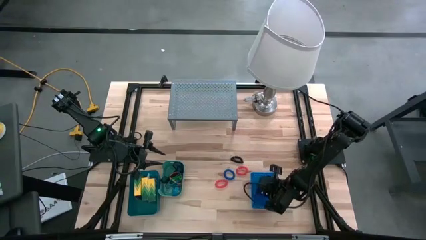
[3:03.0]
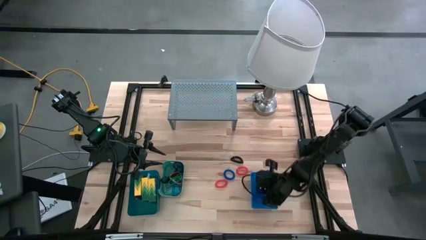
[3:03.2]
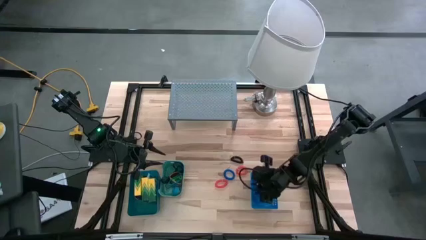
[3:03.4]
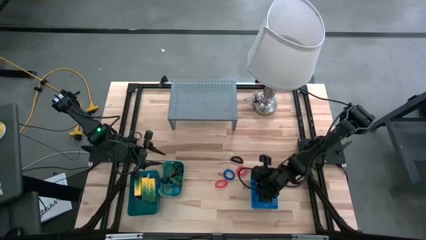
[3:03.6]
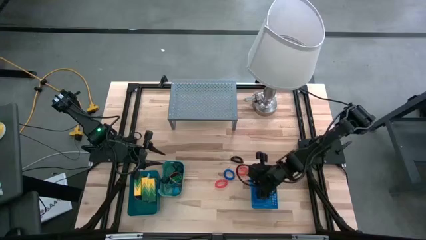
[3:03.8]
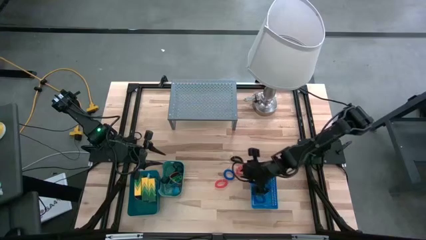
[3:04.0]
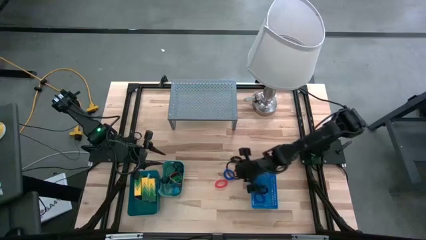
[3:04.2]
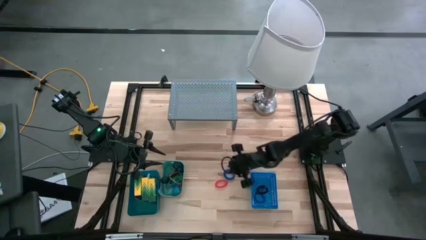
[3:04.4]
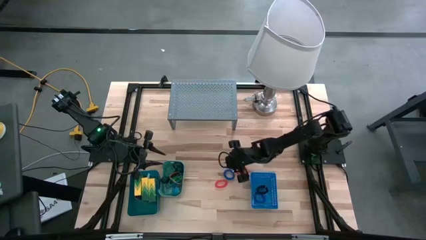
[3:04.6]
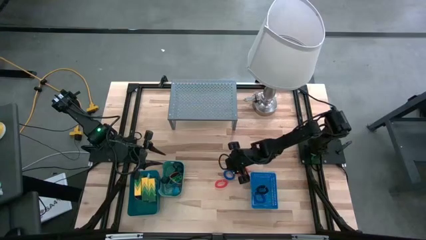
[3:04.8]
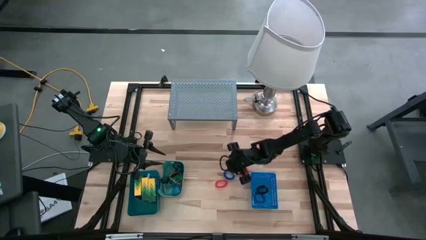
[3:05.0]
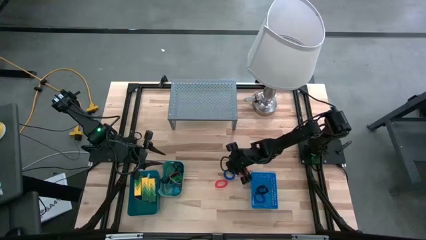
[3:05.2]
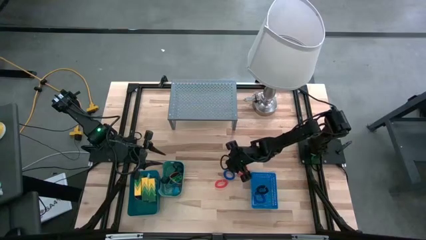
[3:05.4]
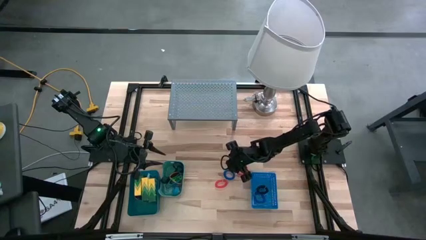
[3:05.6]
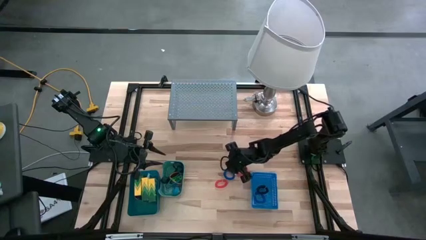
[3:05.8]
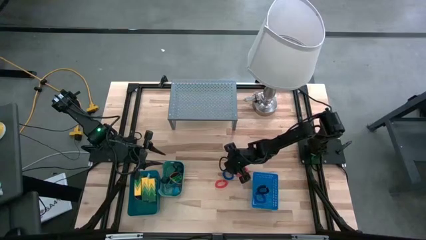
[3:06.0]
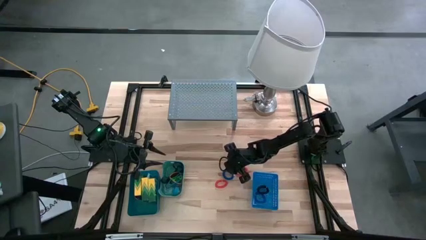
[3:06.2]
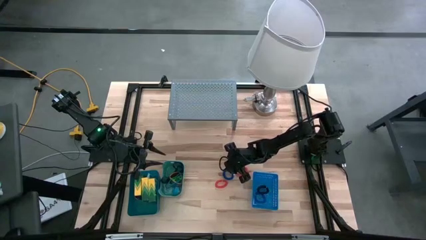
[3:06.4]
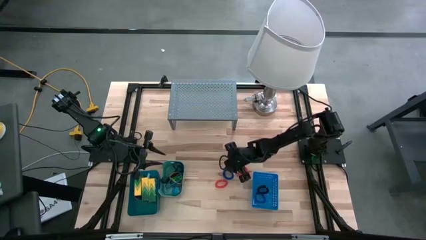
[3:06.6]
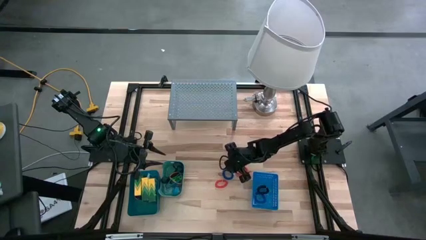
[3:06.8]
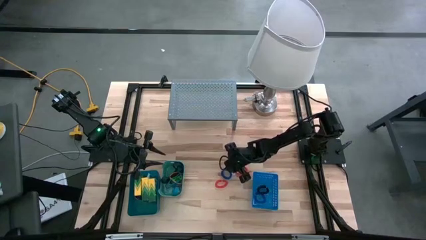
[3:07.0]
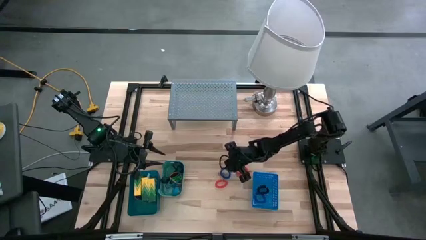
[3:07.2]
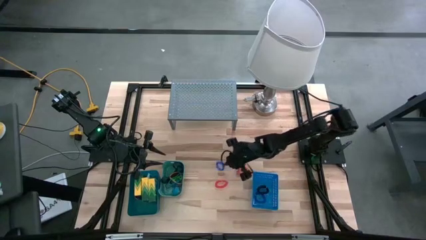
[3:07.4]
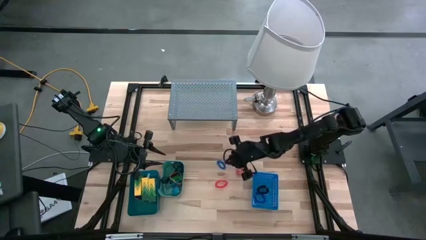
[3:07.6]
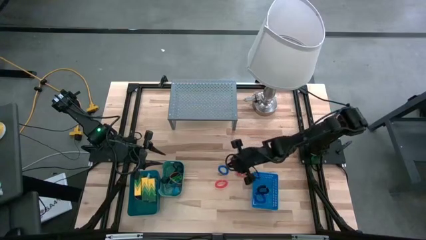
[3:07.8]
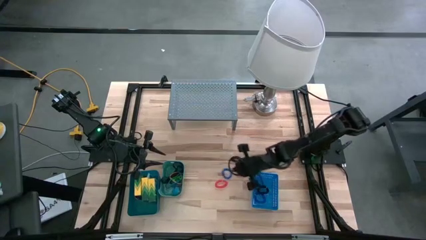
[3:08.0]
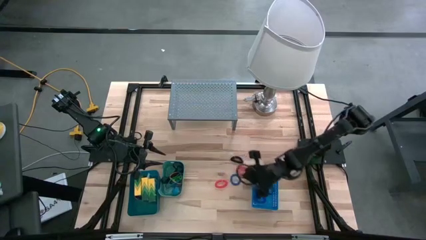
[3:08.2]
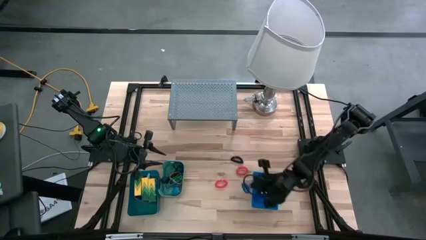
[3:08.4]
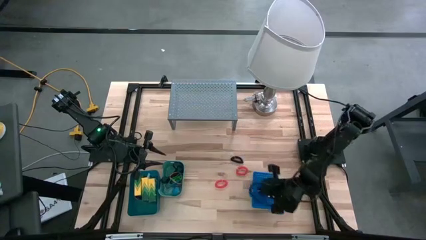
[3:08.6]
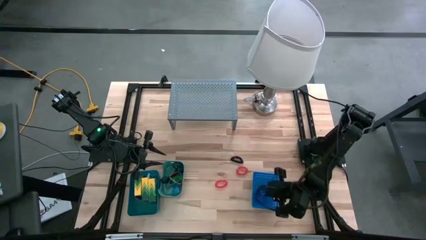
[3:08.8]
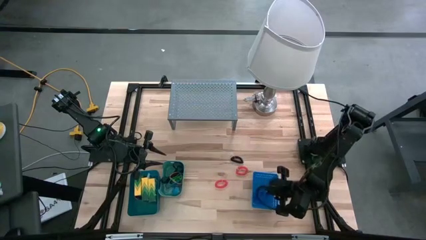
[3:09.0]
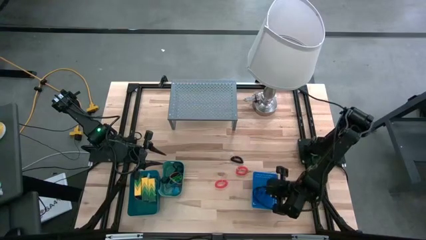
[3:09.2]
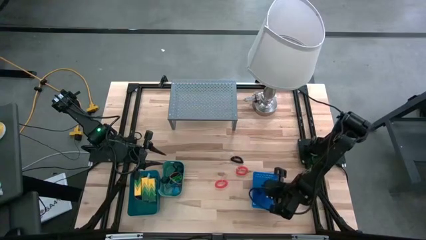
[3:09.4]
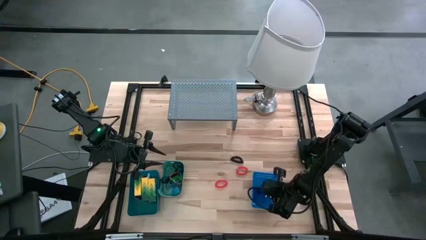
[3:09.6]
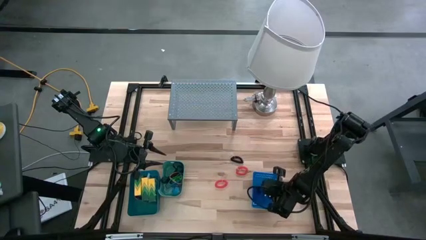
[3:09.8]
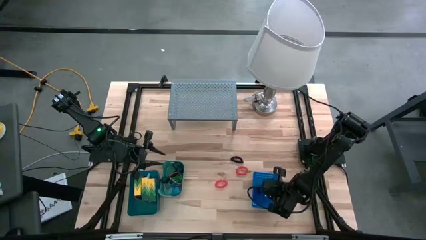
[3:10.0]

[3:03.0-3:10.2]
Task: Pick & Place Office Desk Supplies
Put the blue spring keychain into the blue bin

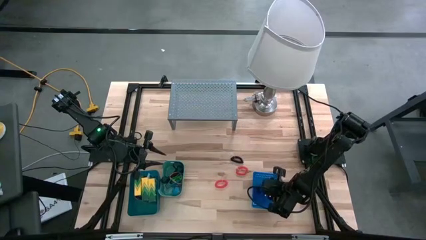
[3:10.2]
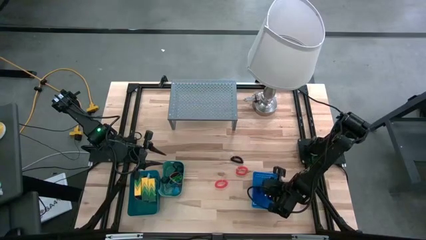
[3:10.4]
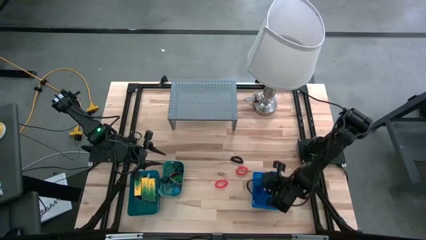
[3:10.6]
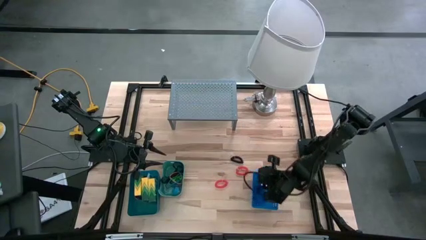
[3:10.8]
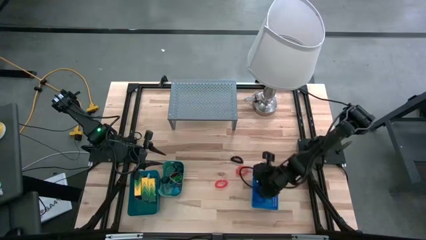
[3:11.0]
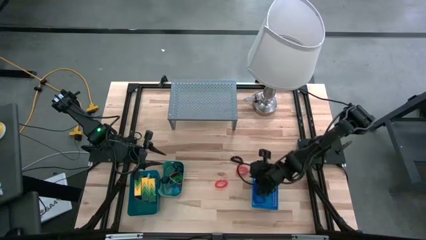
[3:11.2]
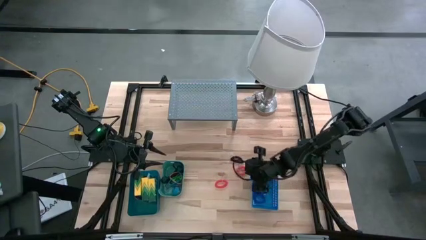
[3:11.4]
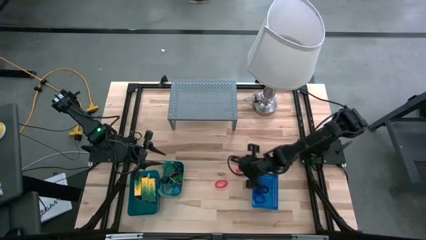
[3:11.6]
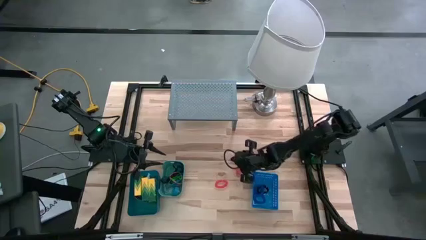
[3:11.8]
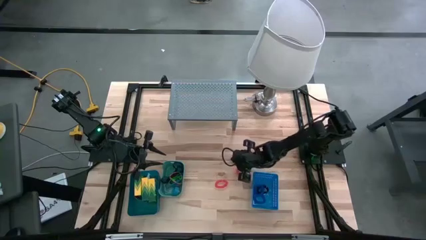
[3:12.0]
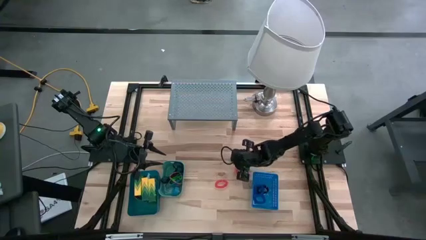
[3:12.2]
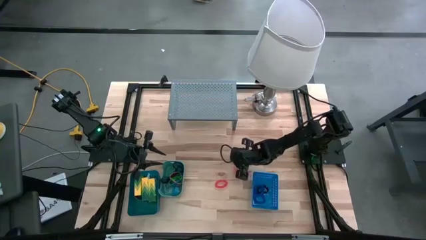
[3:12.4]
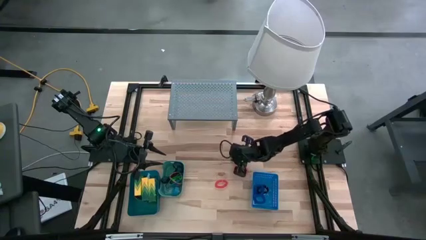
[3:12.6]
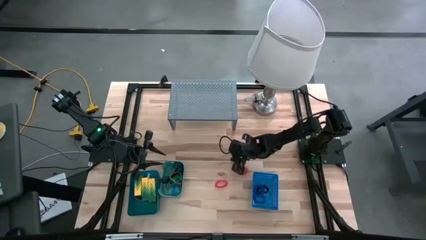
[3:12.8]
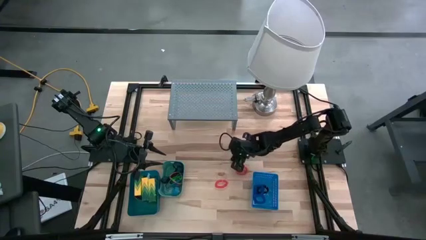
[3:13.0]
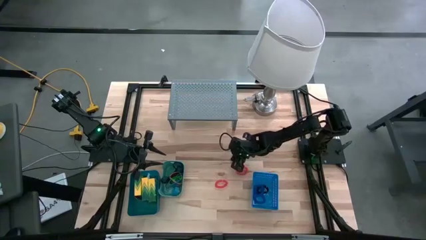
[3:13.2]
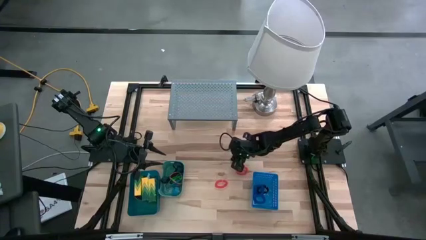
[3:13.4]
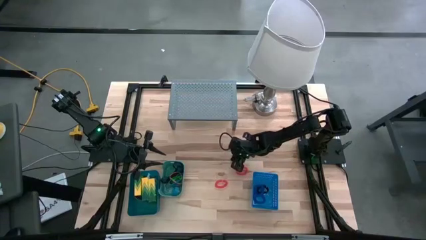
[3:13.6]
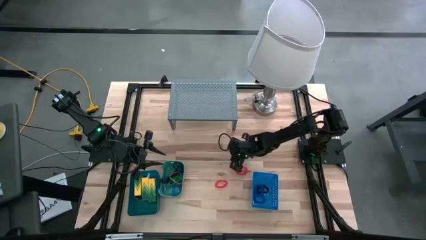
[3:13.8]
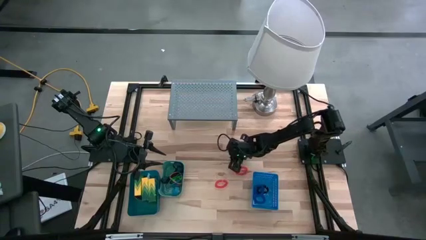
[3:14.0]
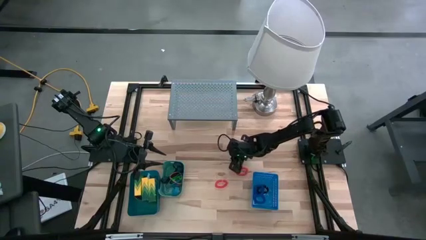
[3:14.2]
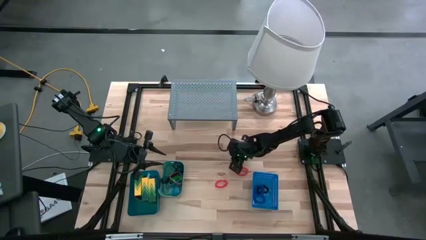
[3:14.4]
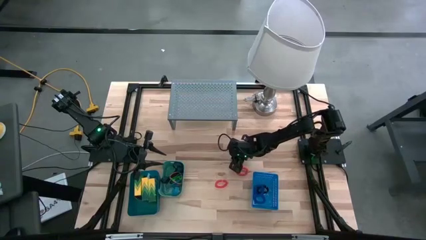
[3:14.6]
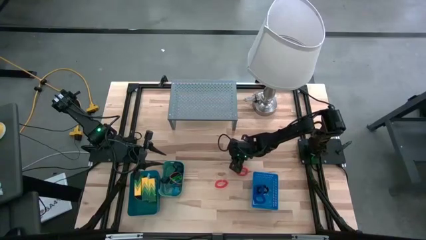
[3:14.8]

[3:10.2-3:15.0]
Put the black spring keychain into the blue bin

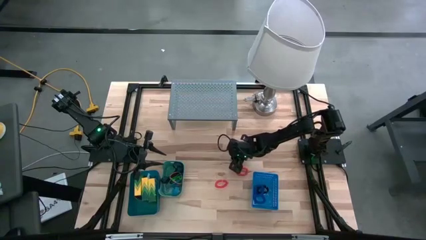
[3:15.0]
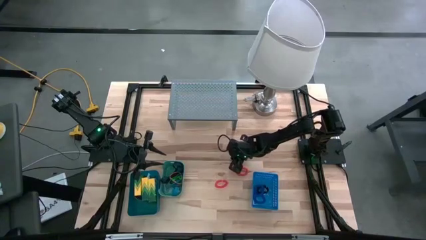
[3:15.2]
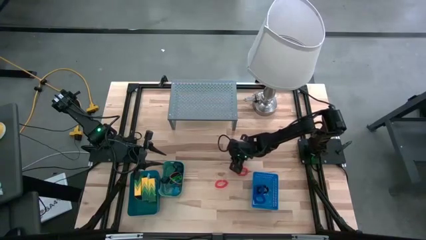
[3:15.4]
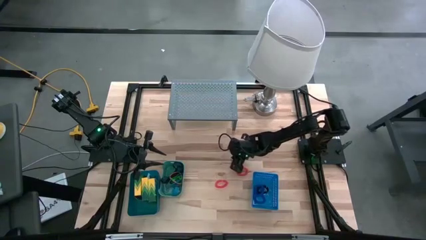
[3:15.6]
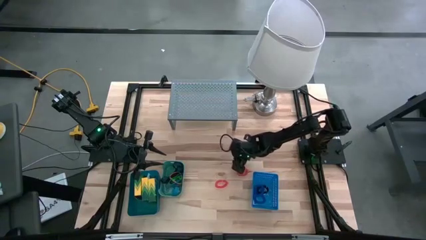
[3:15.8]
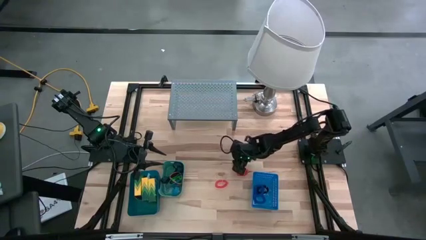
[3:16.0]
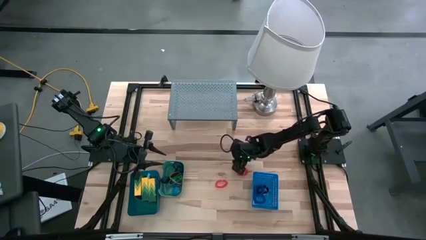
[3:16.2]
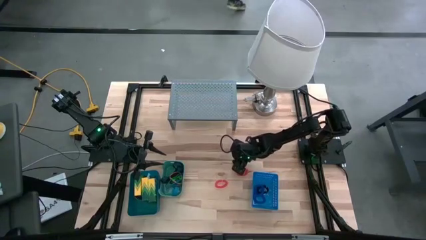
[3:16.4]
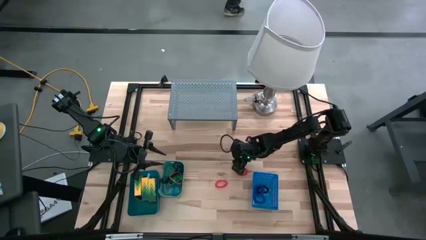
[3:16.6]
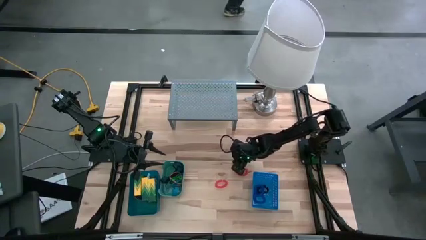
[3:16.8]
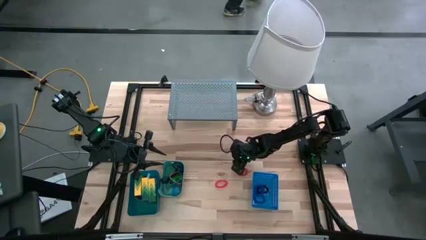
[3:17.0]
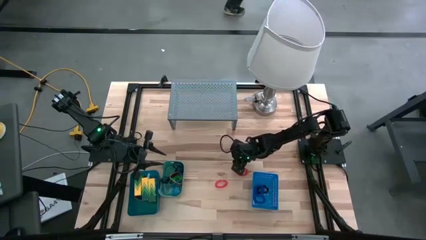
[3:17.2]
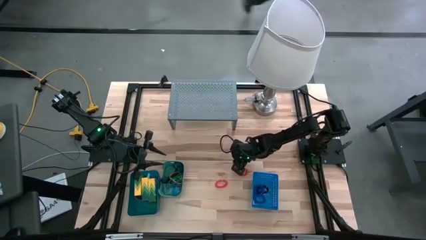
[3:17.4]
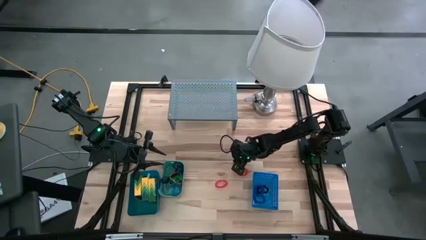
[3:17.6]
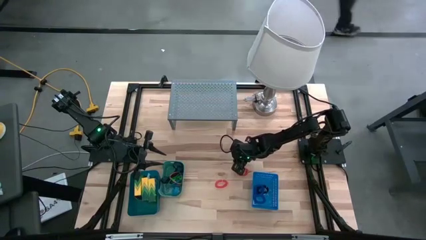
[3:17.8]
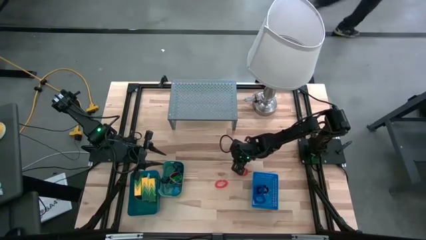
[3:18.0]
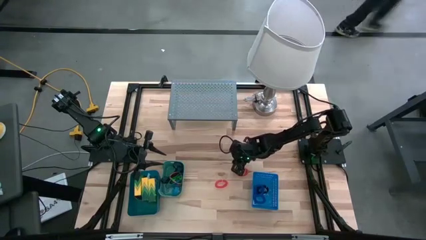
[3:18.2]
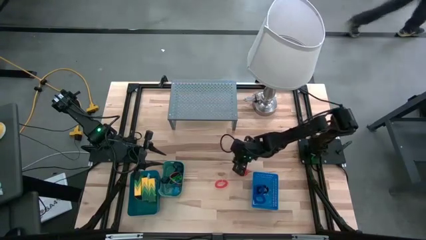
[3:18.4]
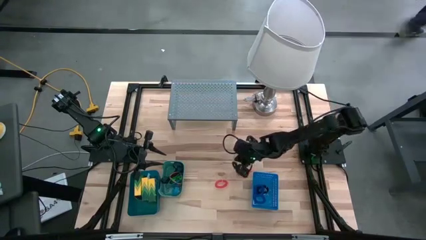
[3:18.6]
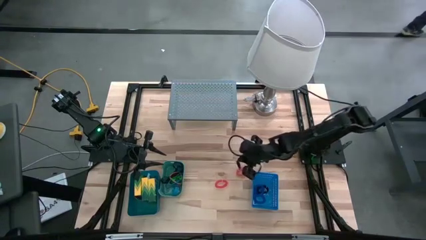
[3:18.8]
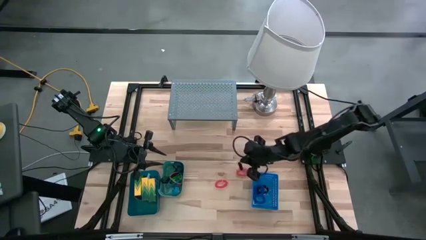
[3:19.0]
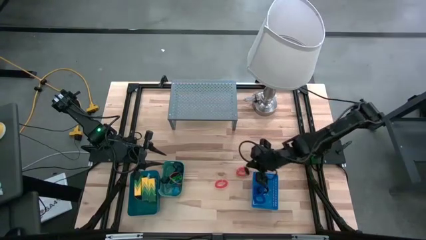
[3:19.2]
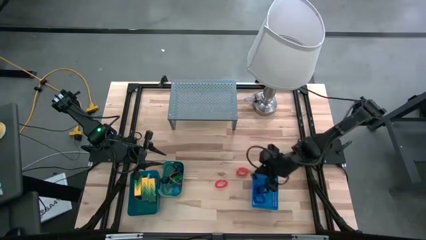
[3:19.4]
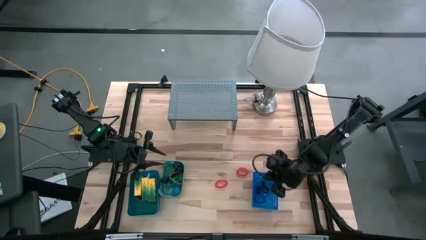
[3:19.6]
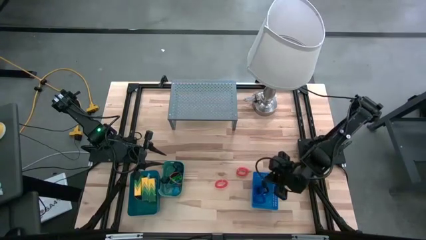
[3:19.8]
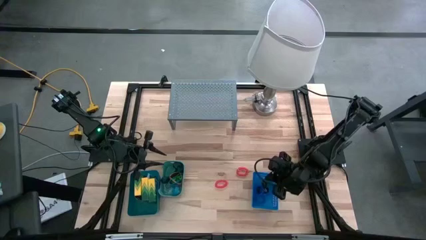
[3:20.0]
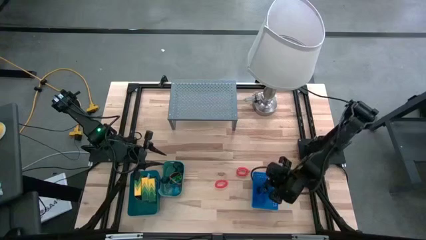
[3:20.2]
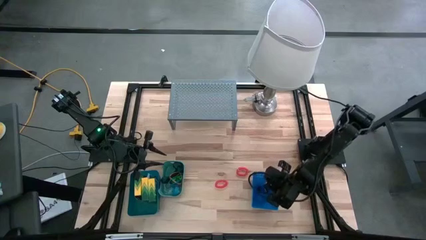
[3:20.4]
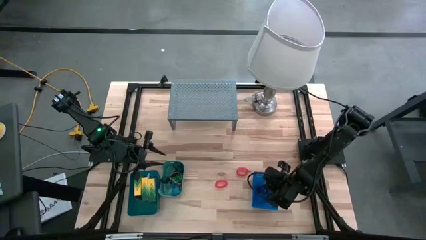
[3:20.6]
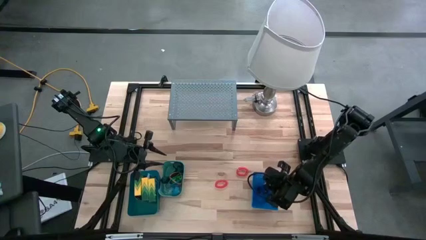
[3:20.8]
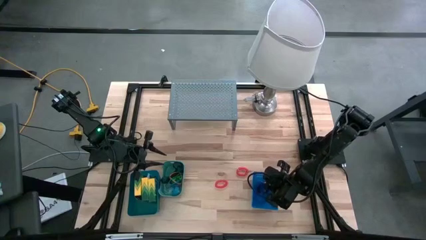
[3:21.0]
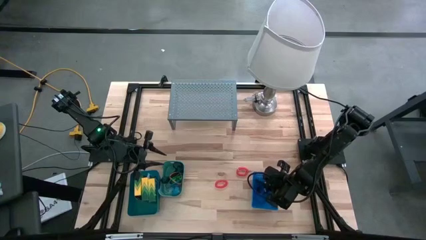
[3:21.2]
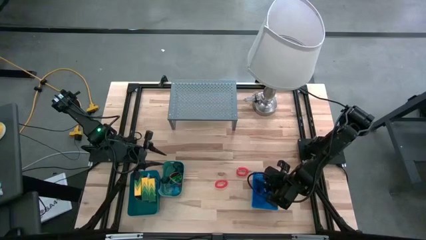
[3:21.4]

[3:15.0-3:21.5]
Put the black spring keychain into the blue bin
